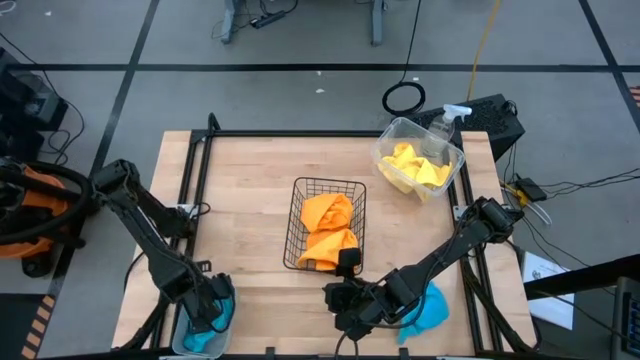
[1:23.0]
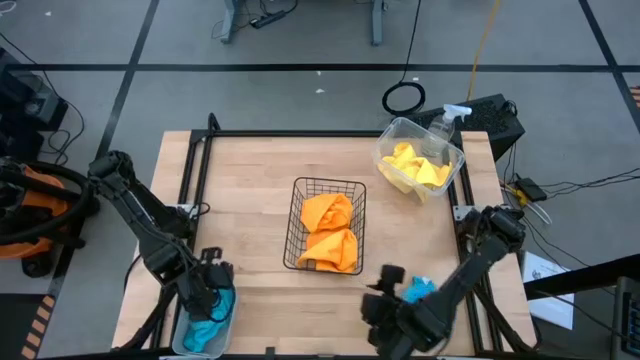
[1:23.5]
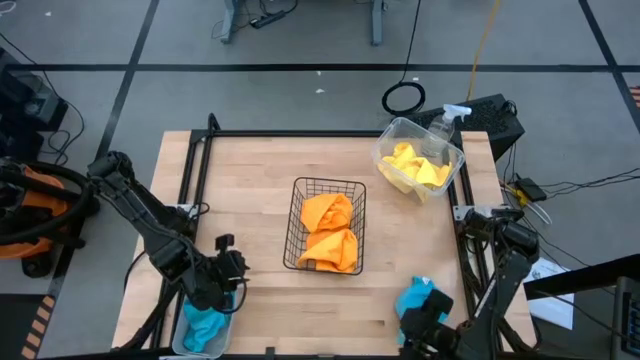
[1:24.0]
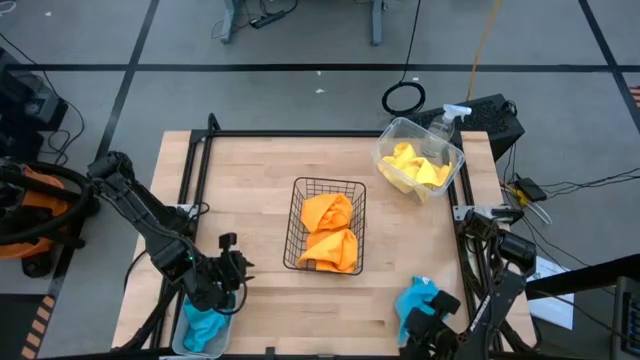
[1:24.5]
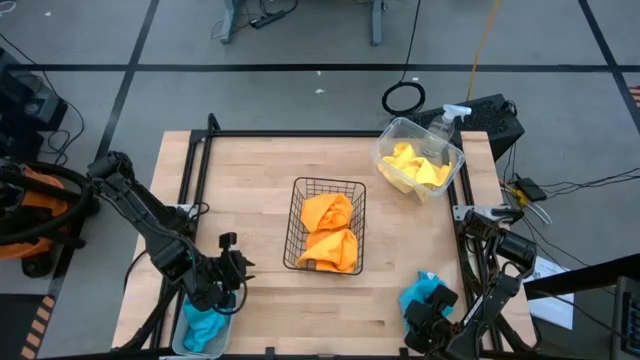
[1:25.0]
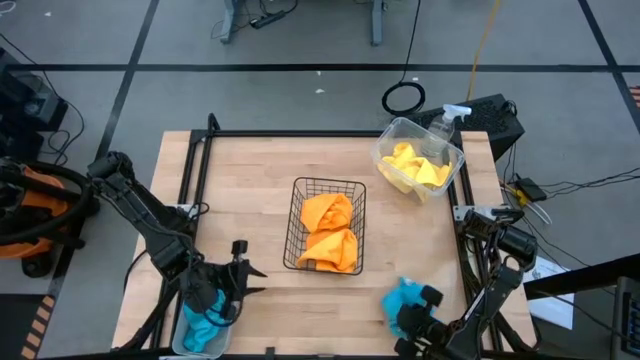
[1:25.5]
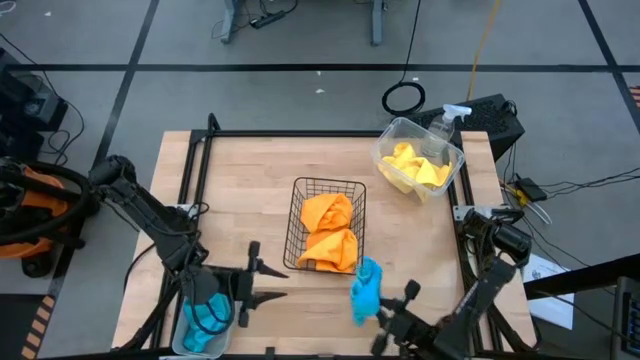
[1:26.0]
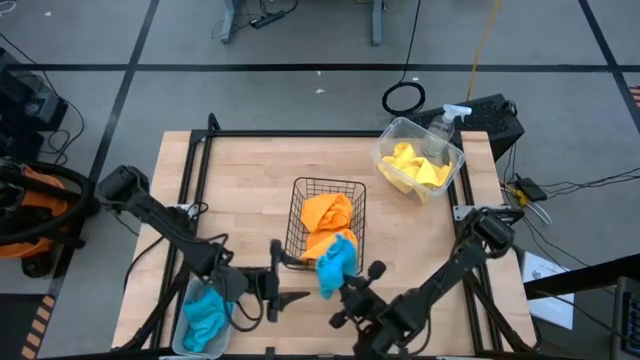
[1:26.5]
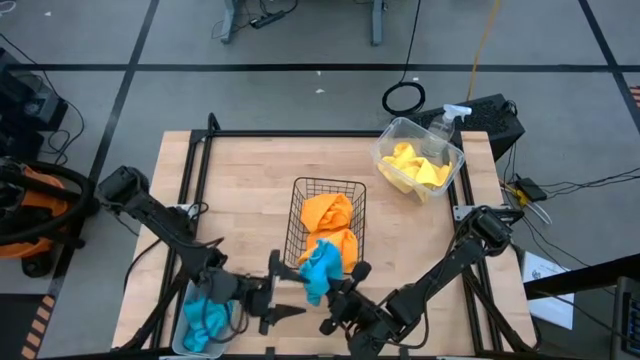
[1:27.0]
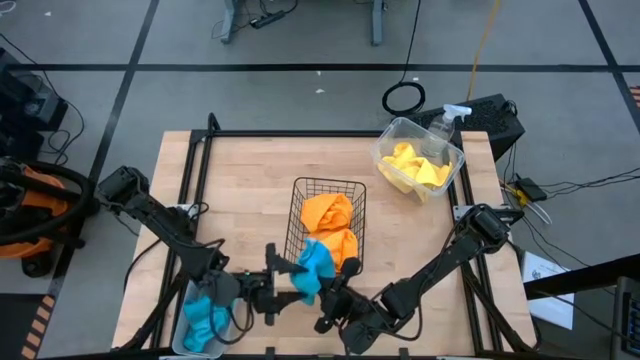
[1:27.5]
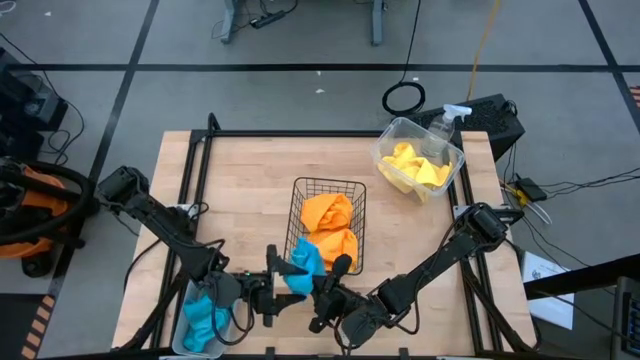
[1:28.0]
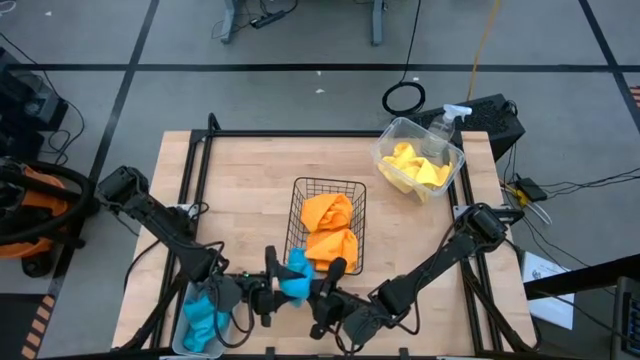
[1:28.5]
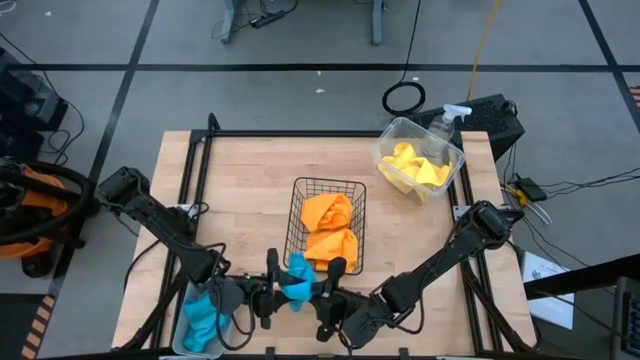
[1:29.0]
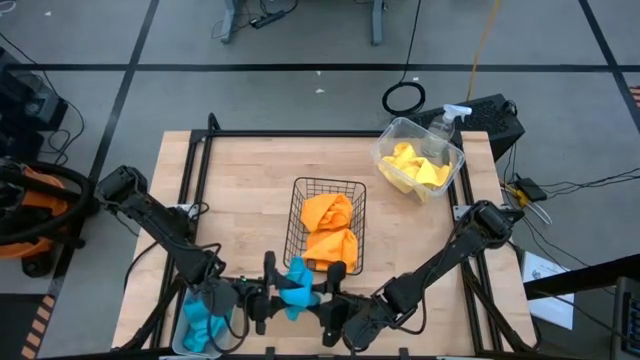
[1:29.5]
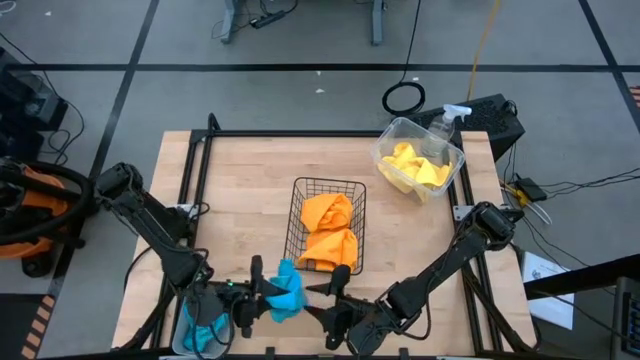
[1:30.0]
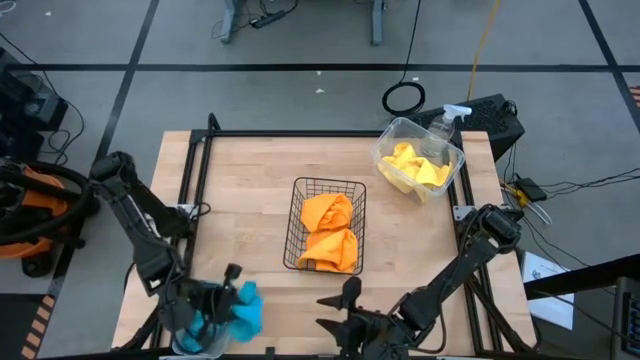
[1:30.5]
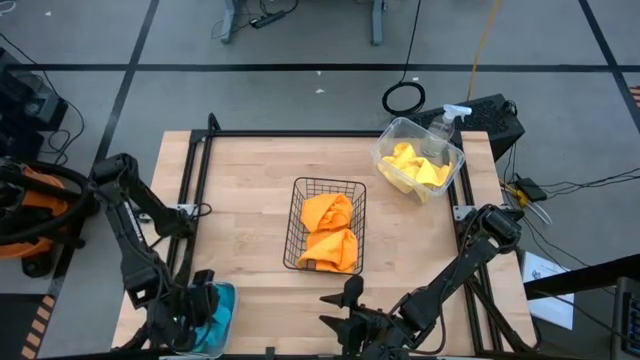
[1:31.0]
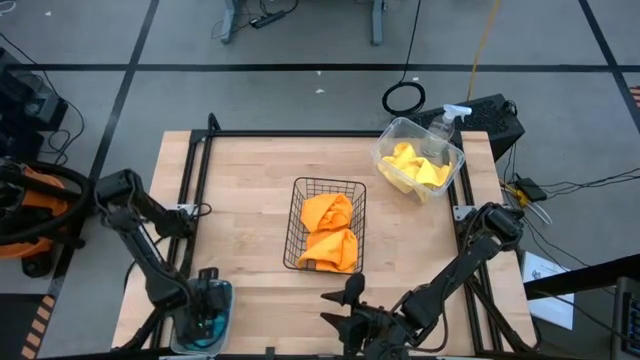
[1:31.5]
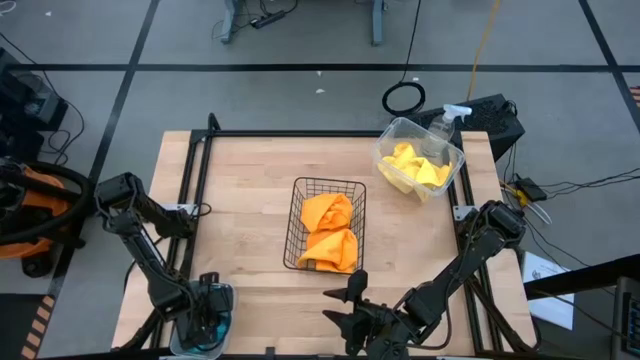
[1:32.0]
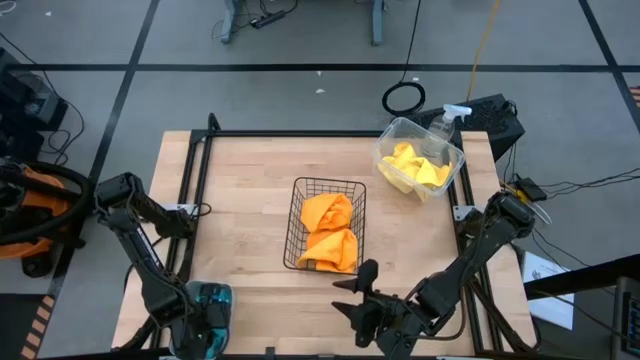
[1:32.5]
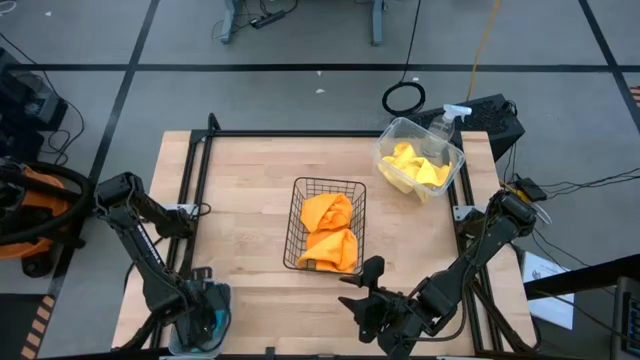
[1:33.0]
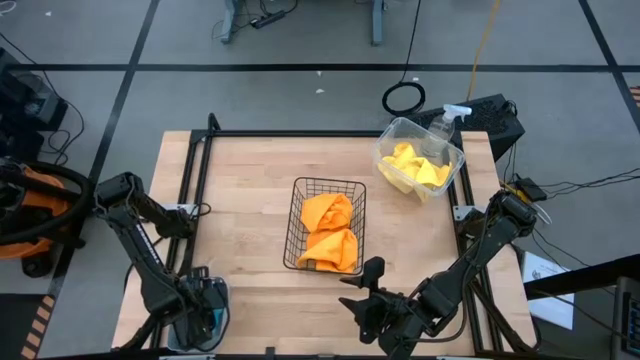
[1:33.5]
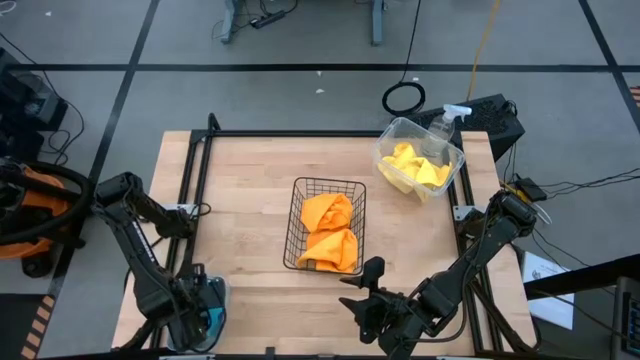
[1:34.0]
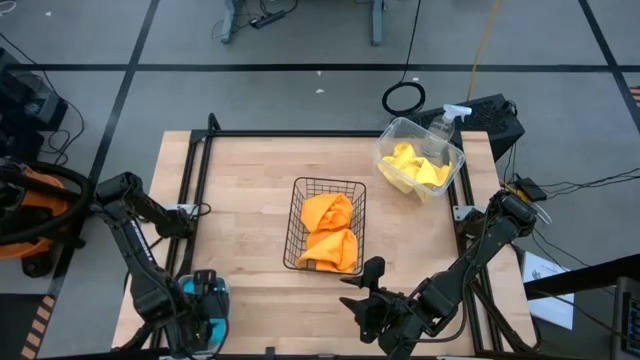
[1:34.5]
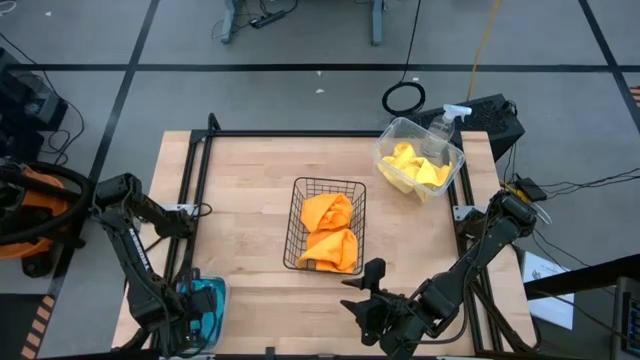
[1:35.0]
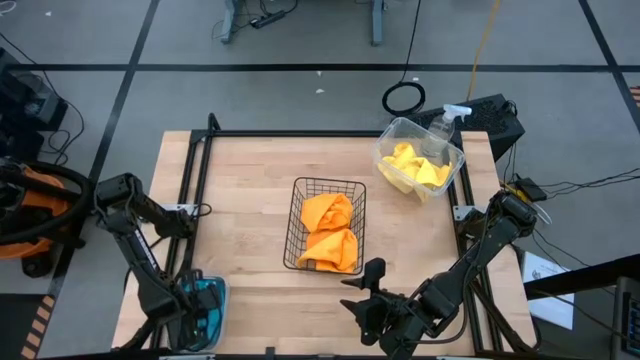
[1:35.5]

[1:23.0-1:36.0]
Task: Sort microfiber towel by color & place in baskets
Put the blue microfiber towel into the gray bin

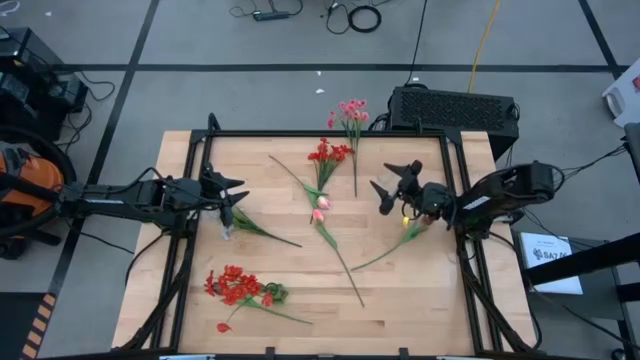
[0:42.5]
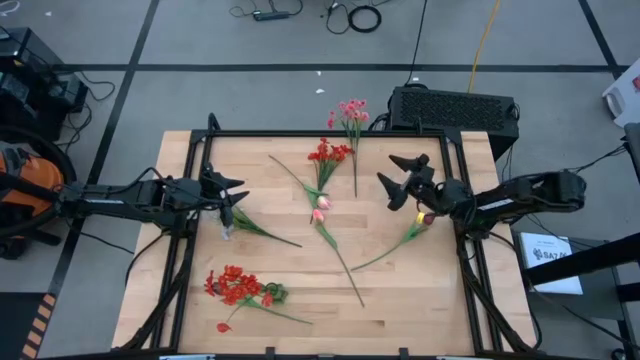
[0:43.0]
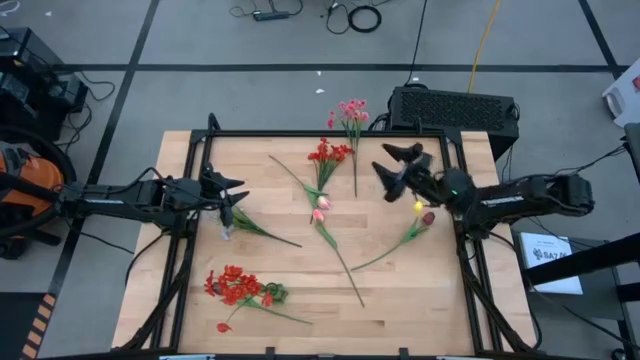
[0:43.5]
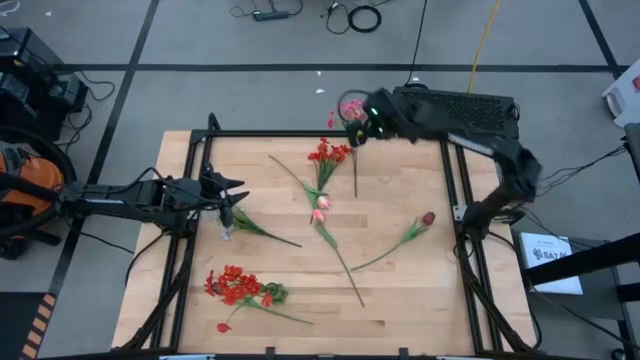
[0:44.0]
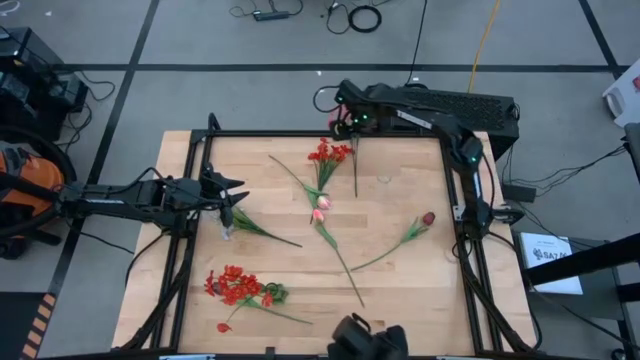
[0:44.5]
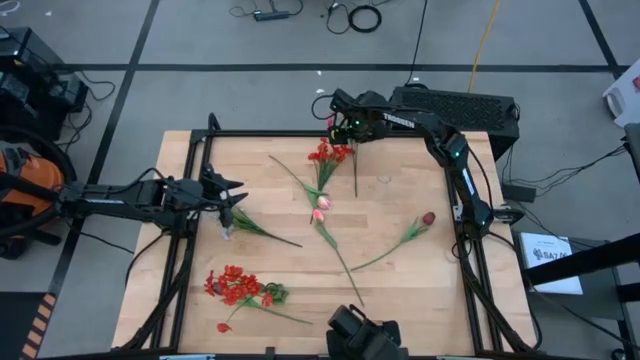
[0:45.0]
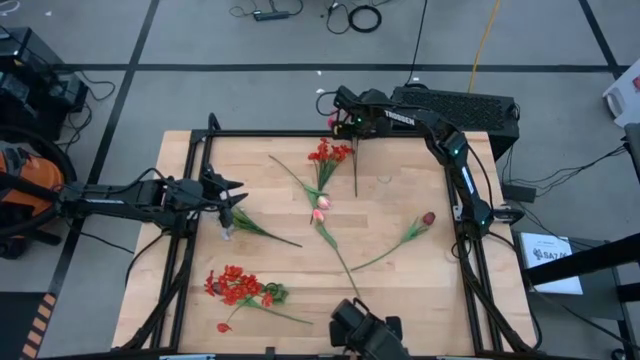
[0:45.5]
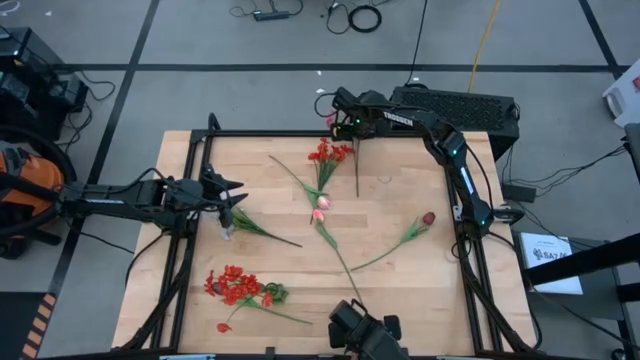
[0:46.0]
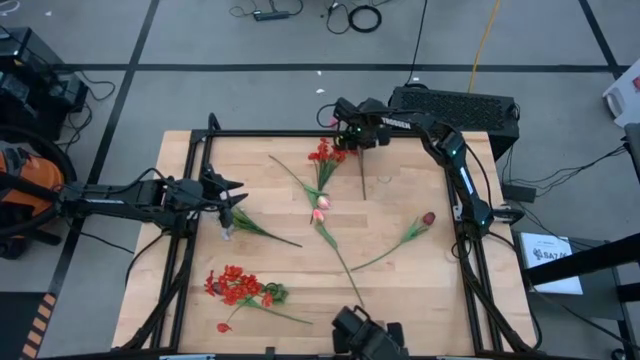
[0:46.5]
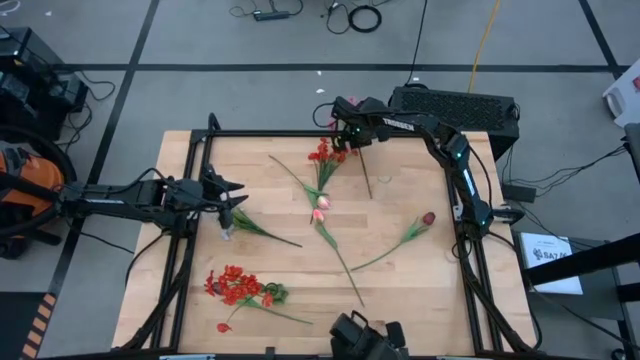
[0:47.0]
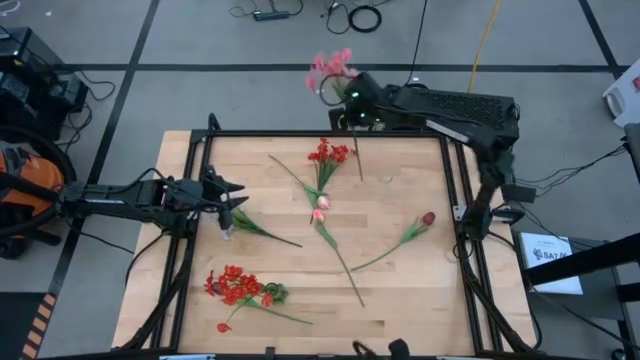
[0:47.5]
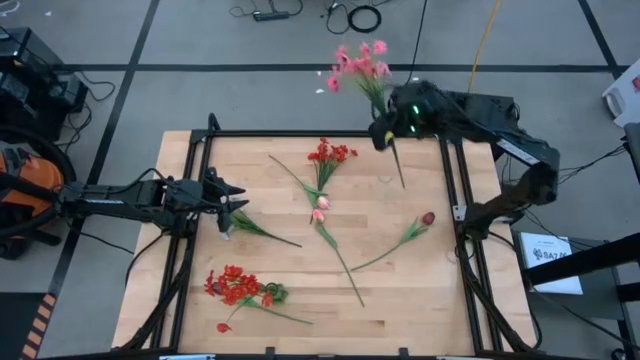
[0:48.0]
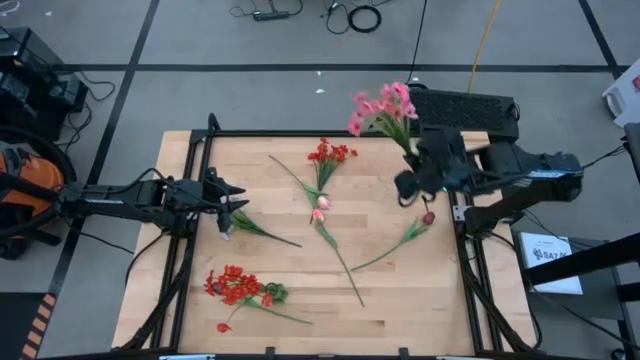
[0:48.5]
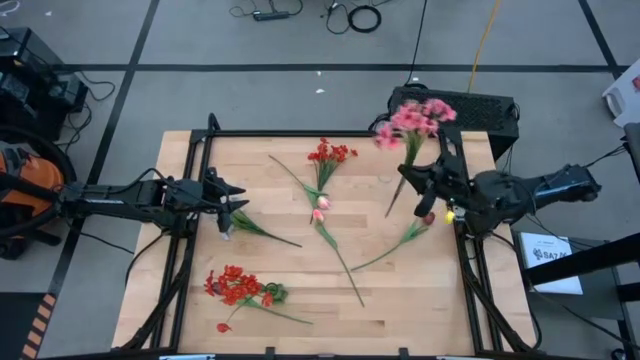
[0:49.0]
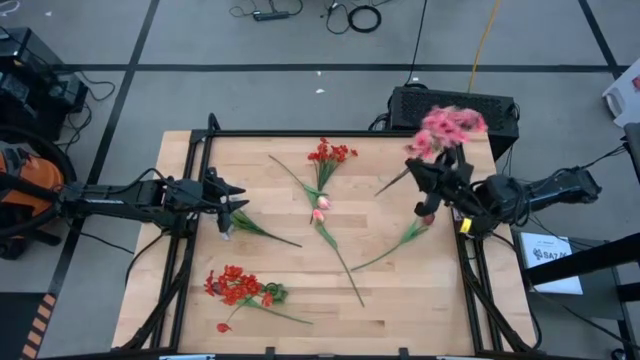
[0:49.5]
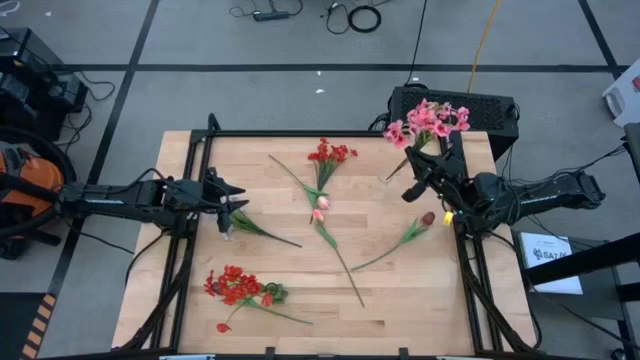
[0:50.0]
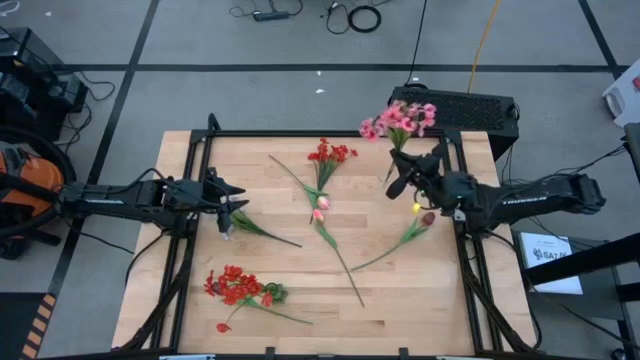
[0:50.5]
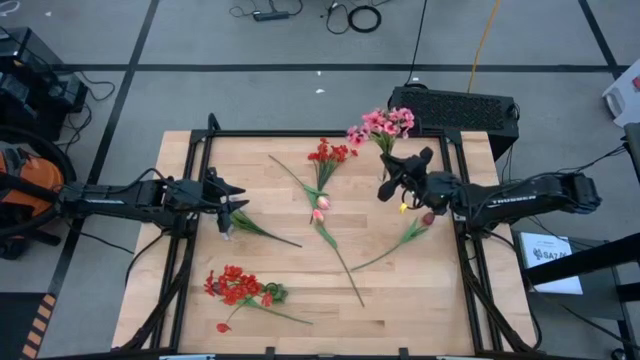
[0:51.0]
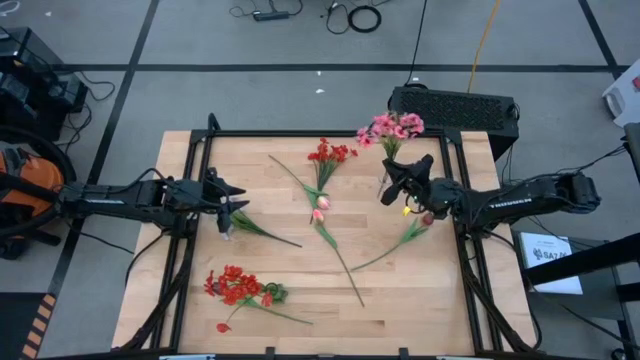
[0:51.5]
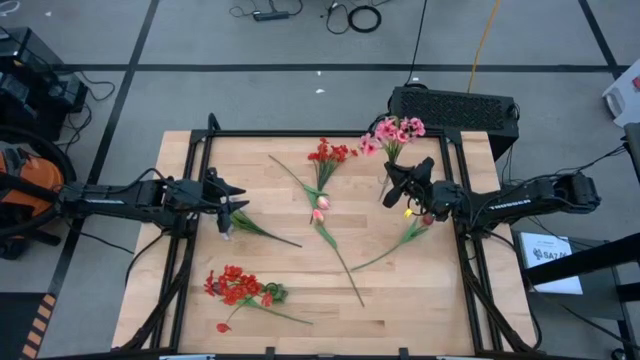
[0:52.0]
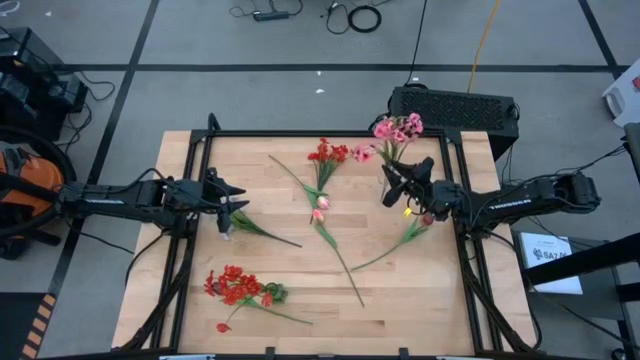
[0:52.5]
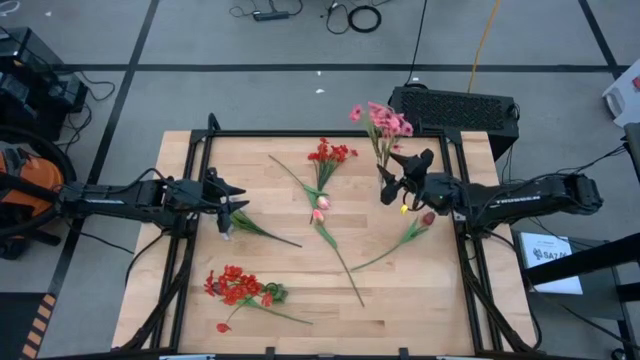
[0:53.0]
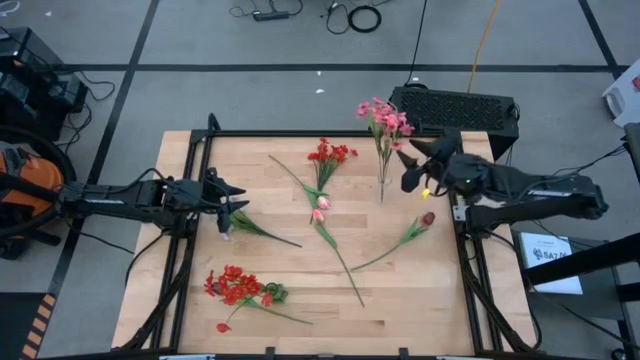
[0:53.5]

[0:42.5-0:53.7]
Task: Sort flowers into vase by color
Put the pink flowers into the transparent vase
